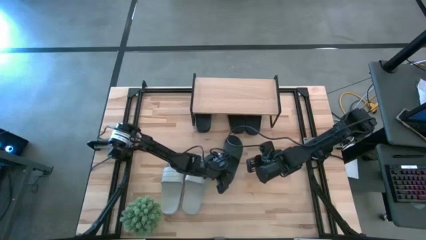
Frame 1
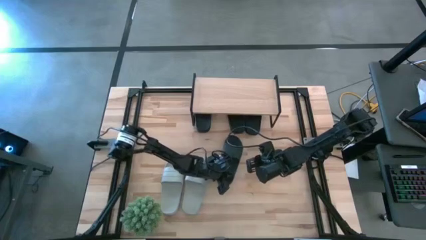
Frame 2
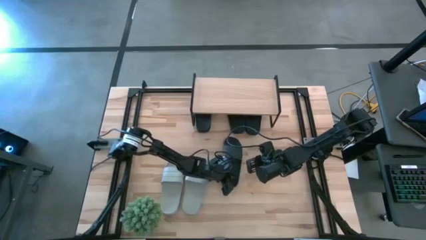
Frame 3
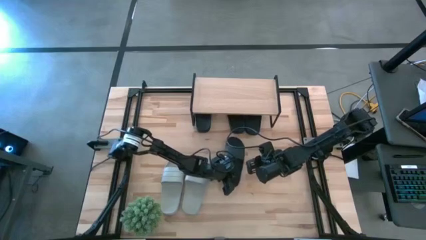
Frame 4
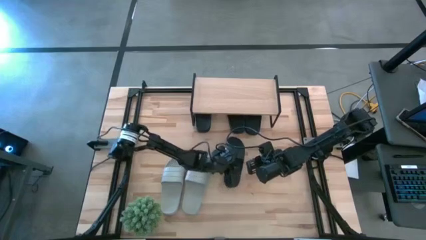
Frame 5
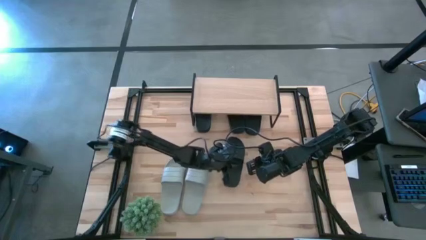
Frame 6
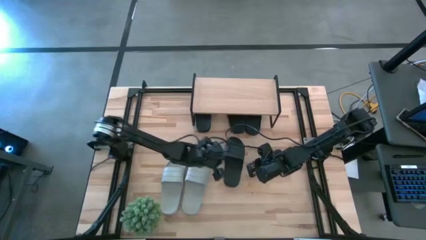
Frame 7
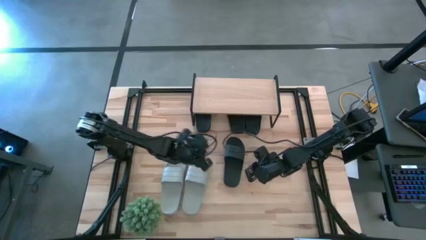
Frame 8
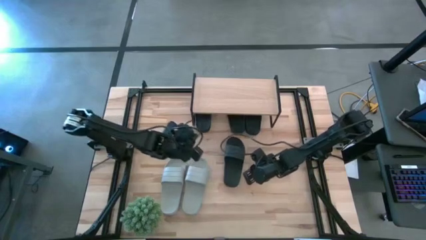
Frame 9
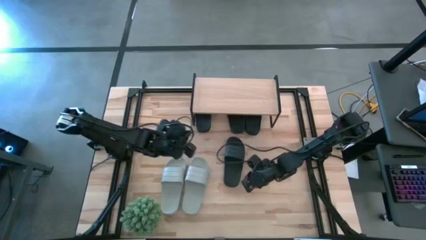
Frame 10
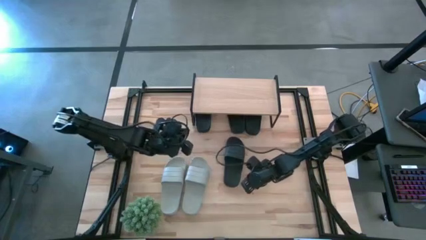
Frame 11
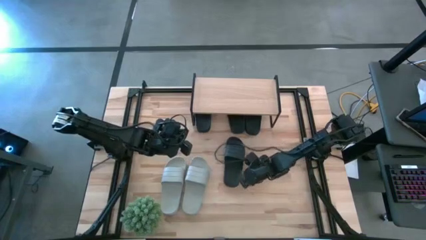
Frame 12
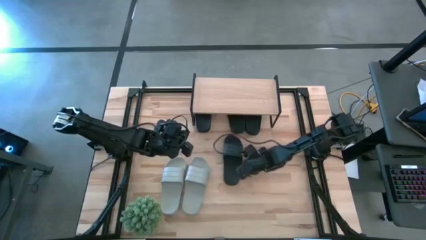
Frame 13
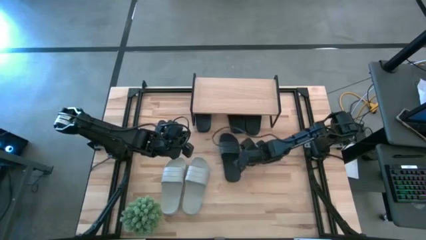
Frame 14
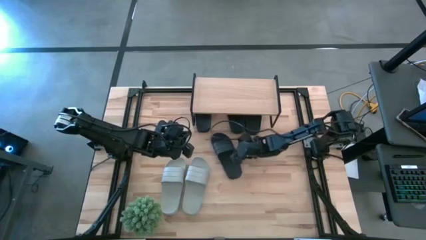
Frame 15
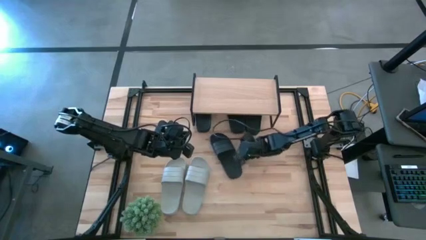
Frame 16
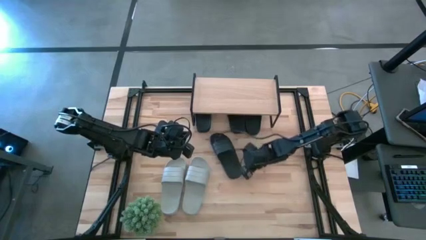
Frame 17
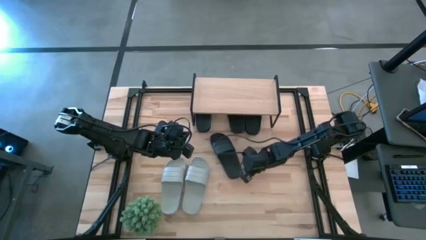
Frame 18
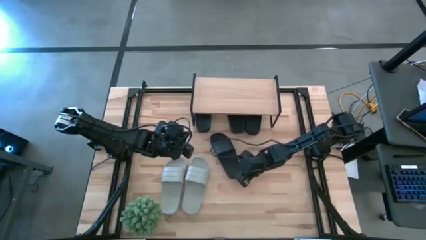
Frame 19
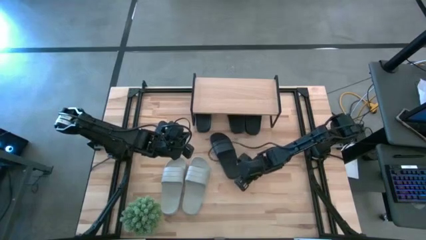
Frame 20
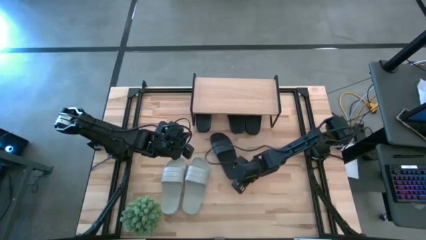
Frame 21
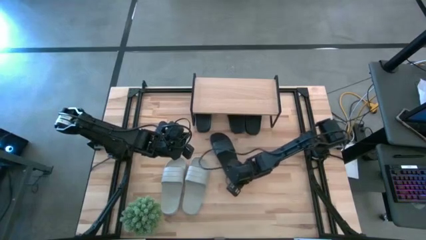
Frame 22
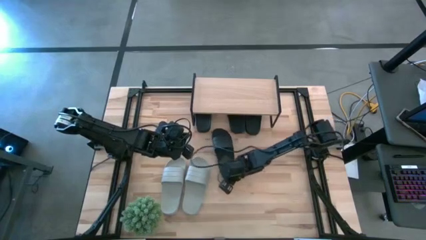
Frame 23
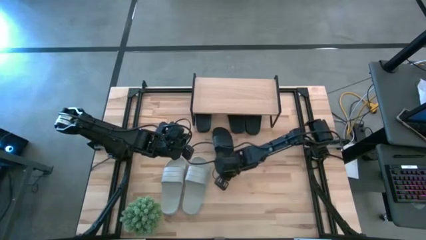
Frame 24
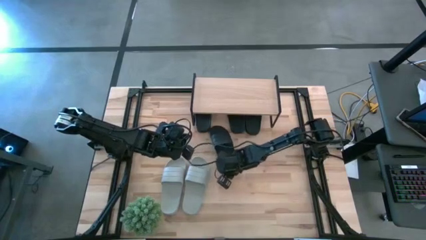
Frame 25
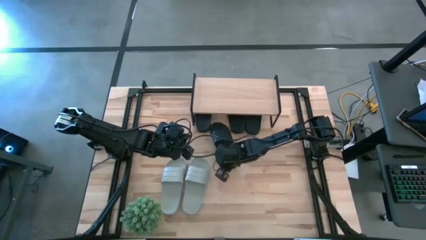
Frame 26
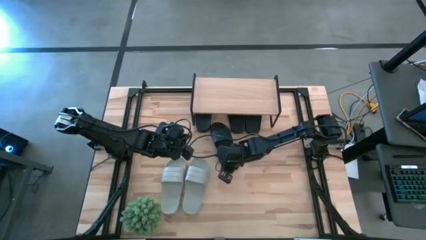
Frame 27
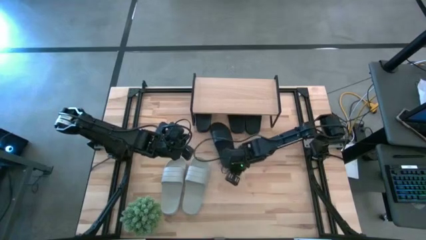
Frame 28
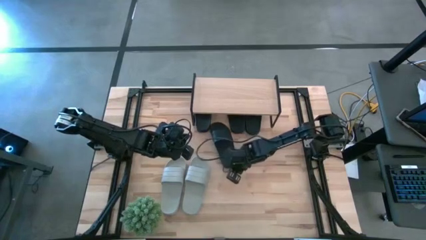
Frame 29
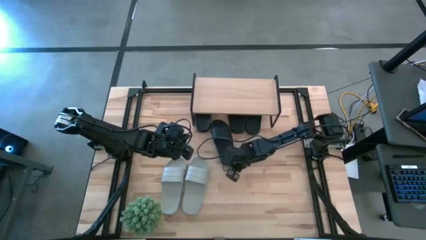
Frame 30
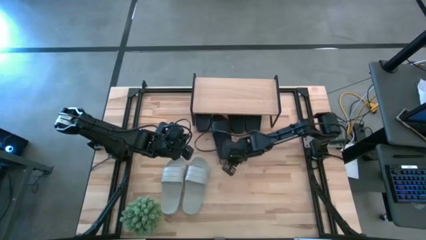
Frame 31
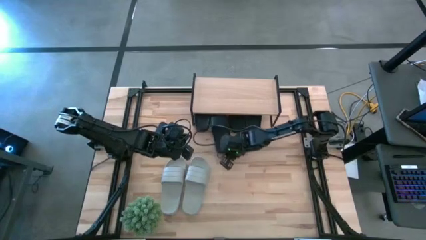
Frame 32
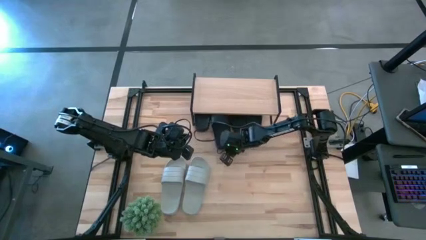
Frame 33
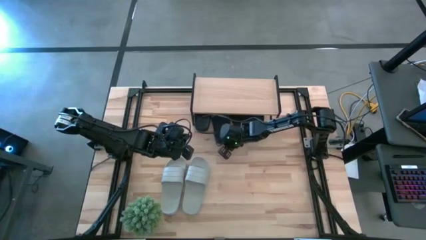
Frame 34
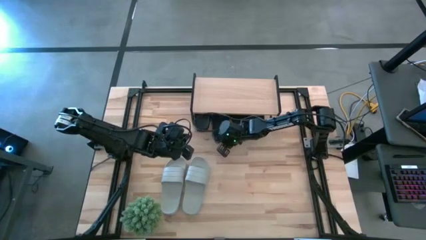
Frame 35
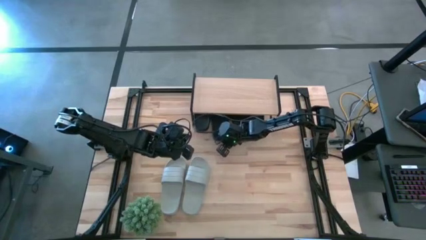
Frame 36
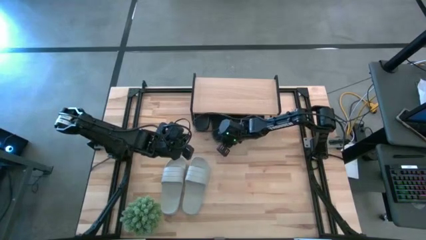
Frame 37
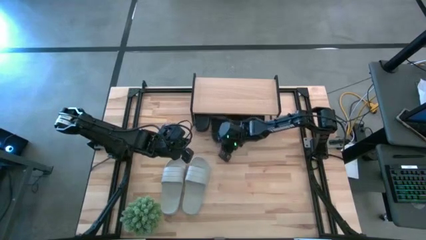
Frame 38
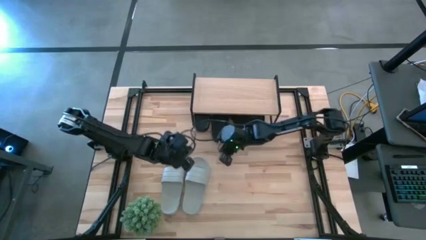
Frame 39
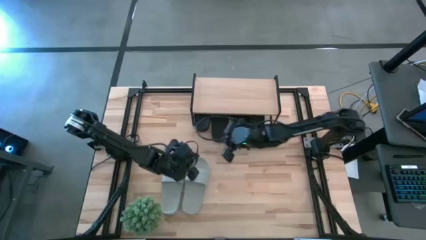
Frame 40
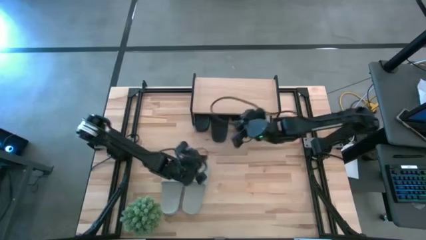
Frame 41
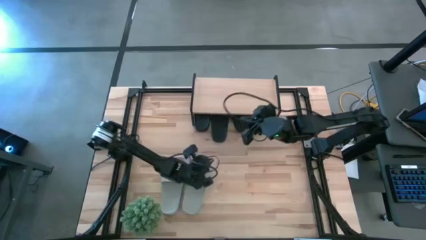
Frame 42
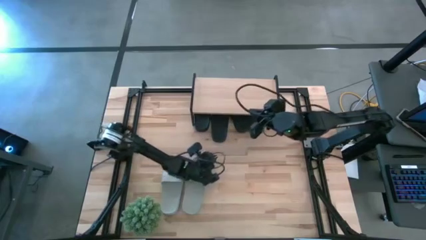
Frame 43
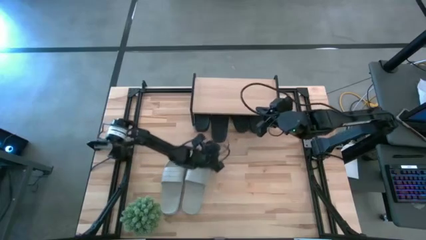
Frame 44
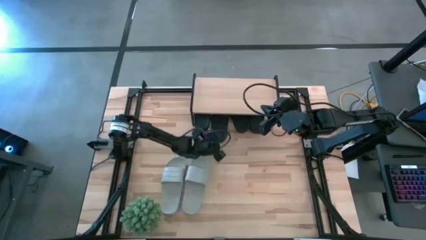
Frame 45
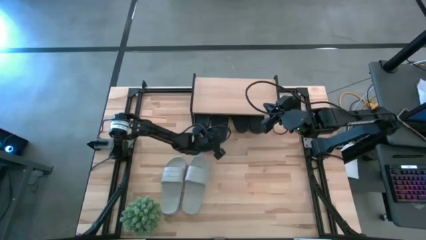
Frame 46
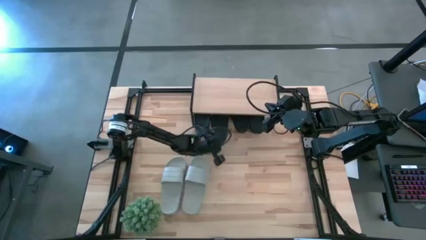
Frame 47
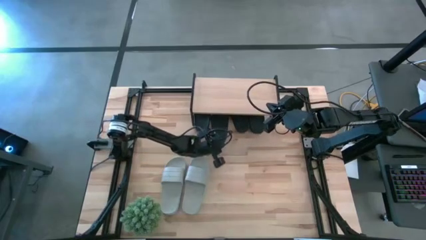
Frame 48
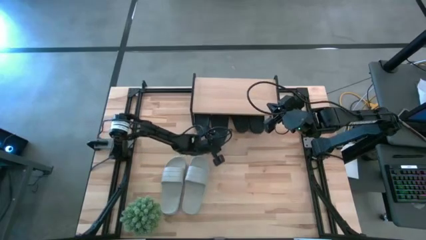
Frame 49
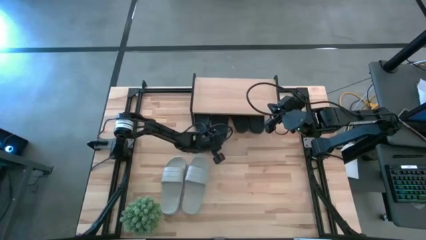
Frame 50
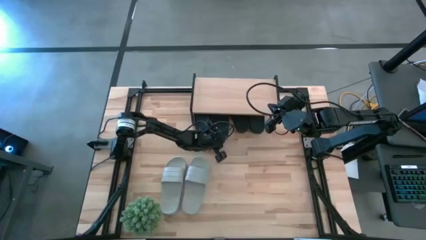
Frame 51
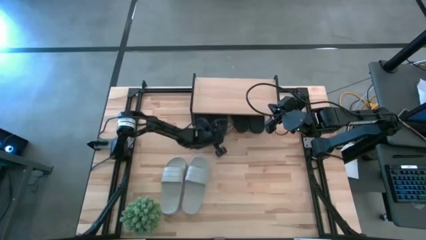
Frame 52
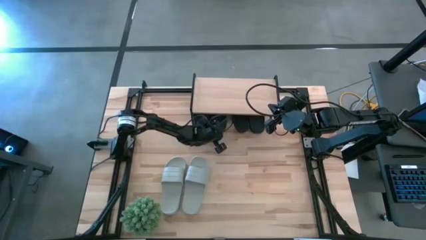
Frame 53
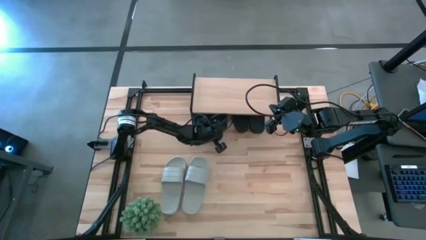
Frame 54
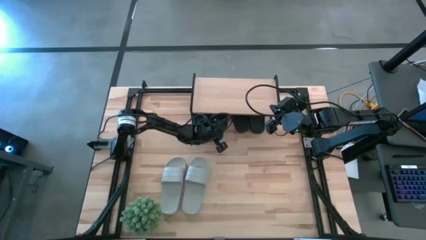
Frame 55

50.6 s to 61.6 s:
Task: Pick and place slides into the shelf
Put the black slide under the shelf

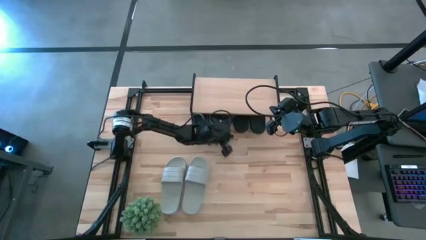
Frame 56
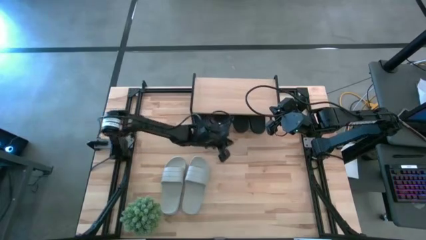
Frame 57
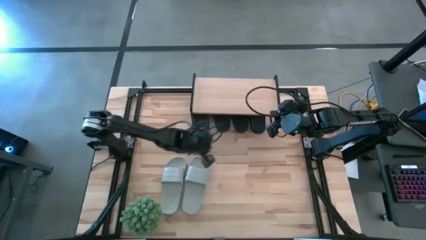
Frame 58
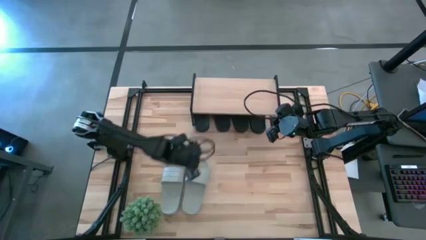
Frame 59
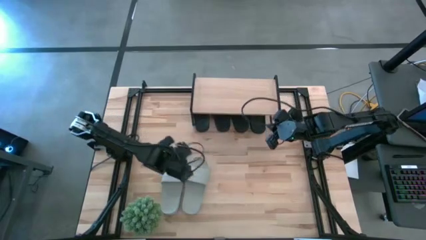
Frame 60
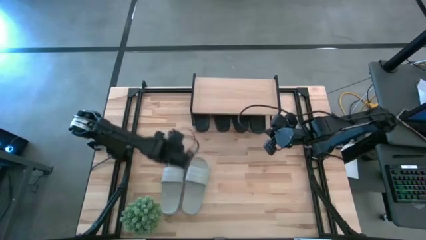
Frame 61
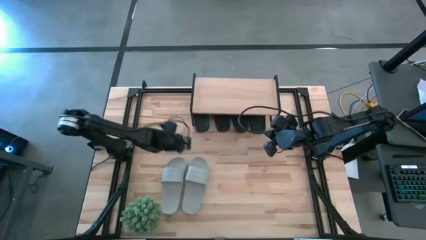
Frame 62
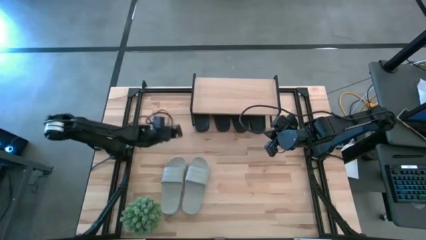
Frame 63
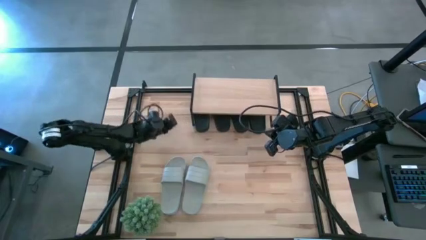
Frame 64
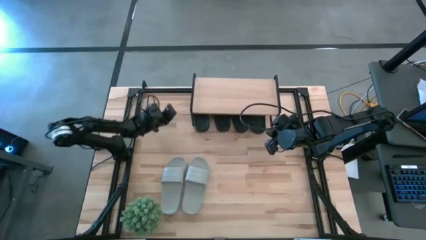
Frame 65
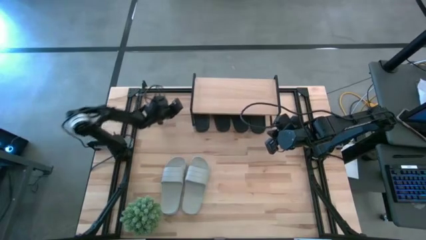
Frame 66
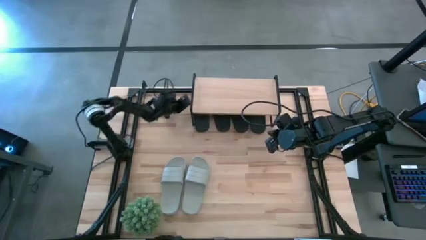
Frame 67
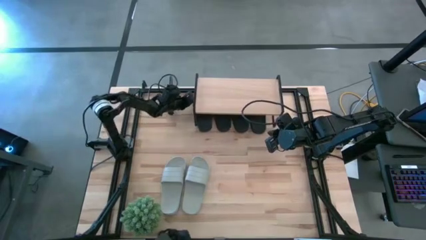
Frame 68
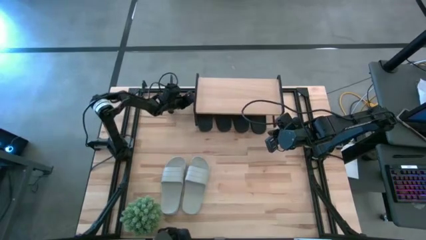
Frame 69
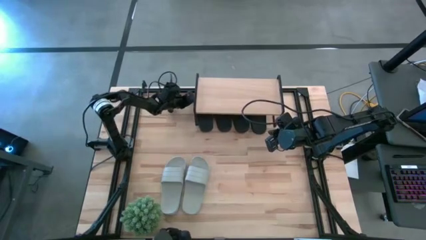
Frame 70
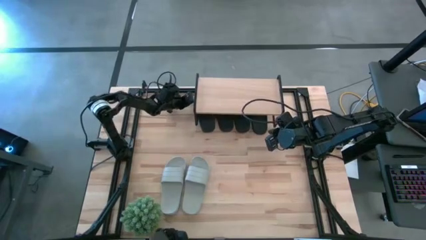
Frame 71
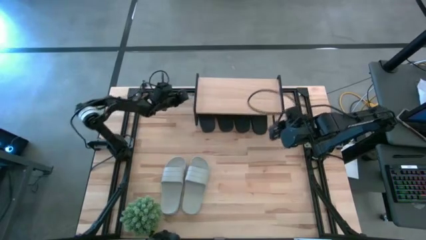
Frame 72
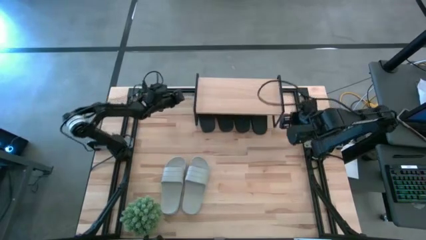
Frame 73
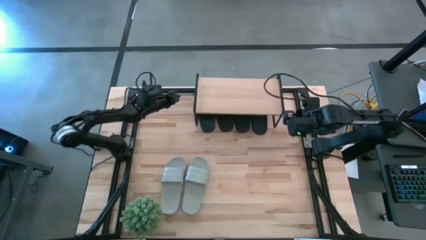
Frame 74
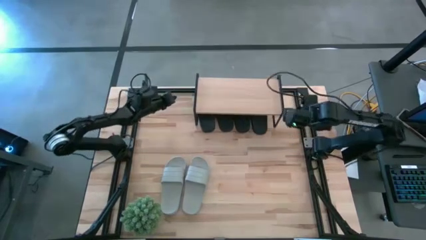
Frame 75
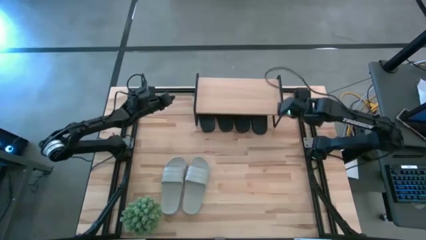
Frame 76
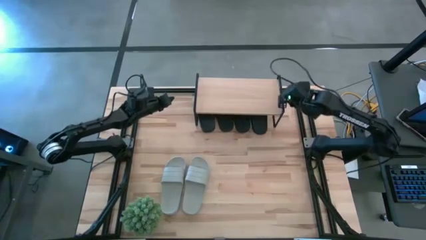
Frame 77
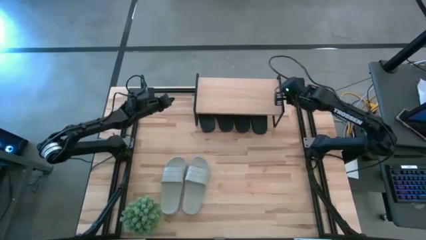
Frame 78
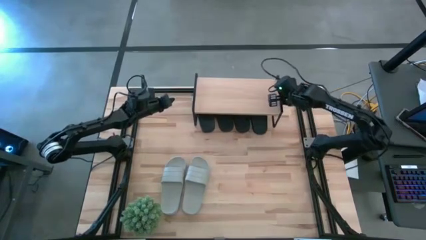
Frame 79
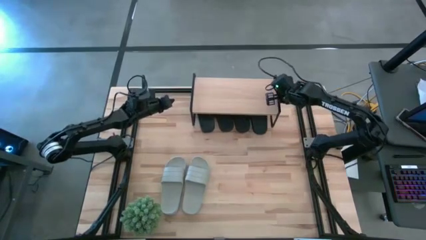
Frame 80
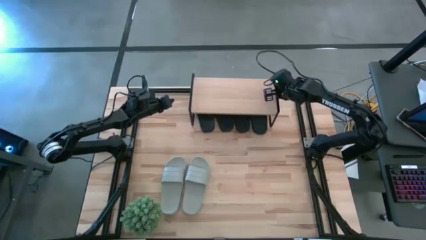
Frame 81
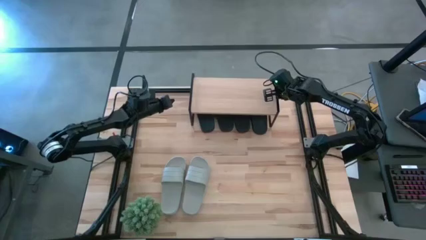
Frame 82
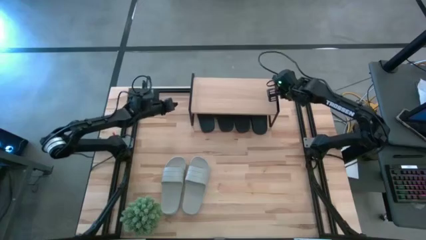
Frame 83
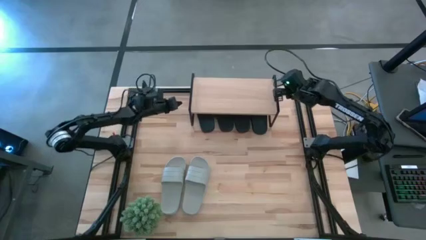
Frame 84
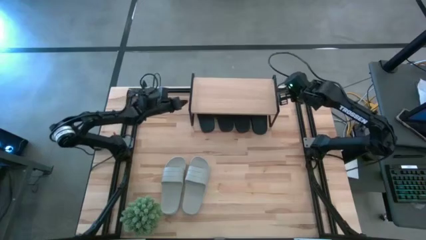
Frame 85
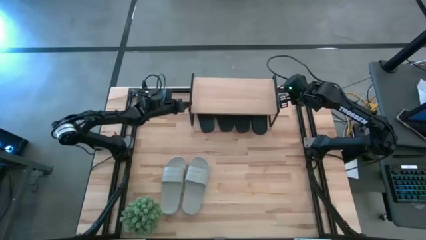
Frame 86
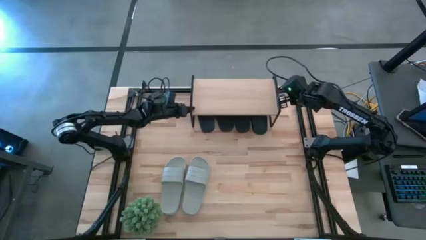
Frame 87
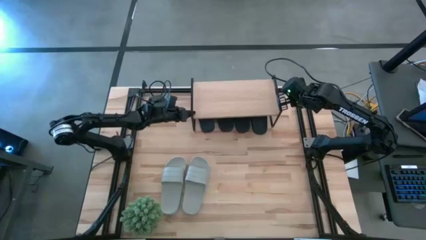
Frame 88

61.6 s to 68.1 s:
Adjust the shelf
